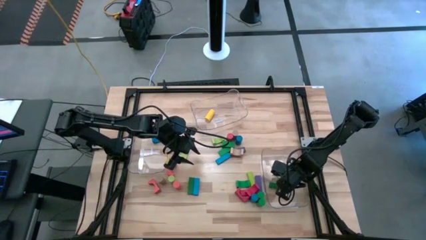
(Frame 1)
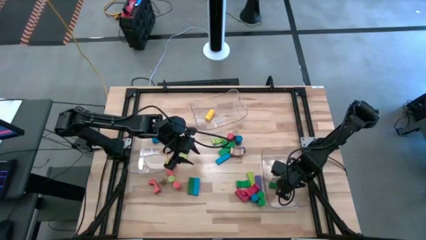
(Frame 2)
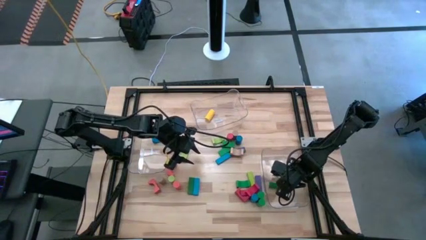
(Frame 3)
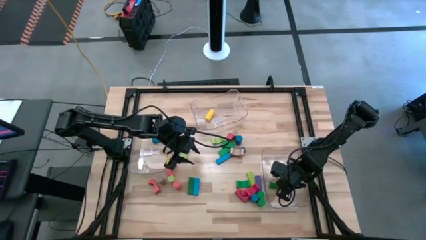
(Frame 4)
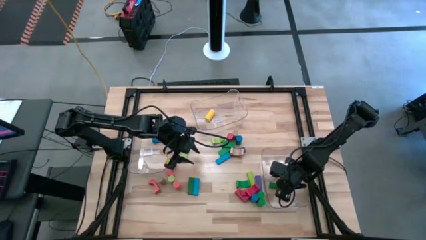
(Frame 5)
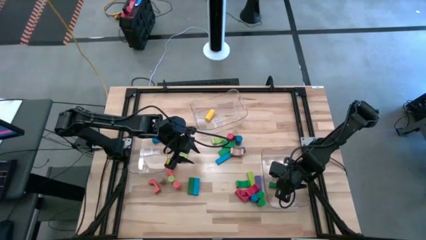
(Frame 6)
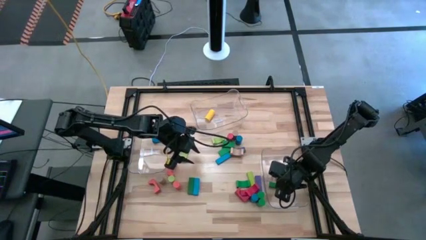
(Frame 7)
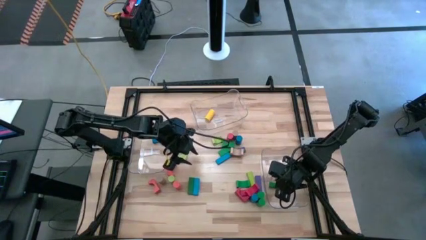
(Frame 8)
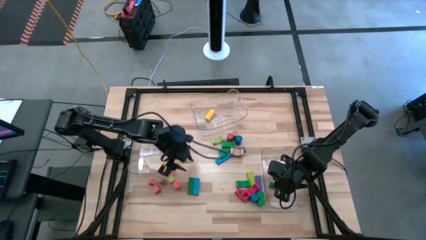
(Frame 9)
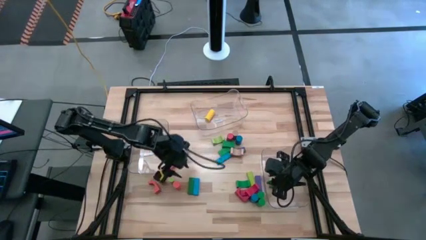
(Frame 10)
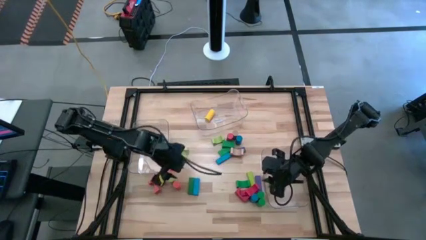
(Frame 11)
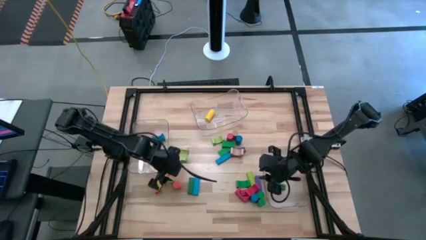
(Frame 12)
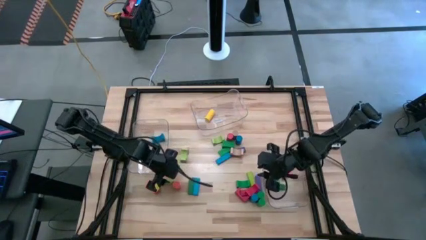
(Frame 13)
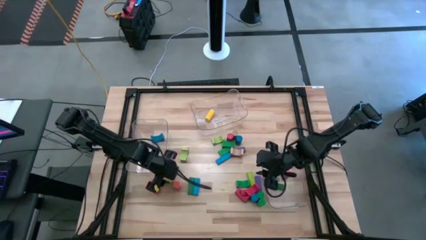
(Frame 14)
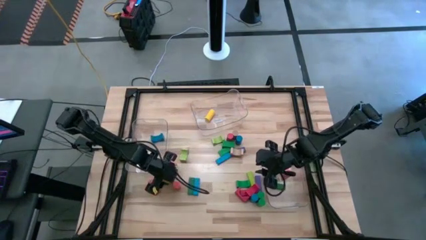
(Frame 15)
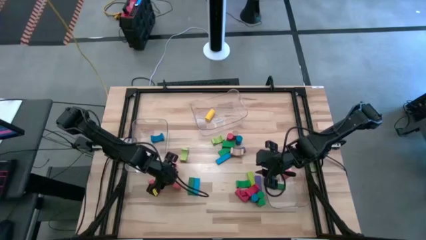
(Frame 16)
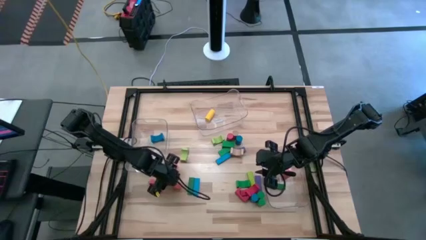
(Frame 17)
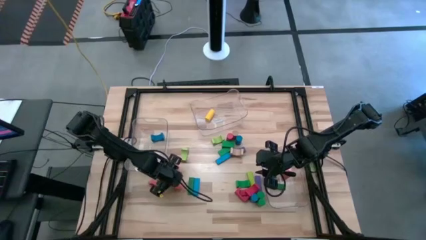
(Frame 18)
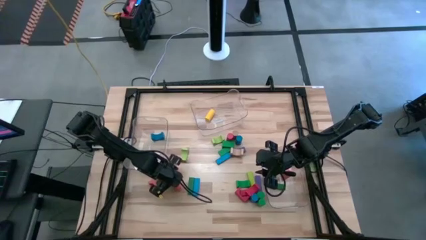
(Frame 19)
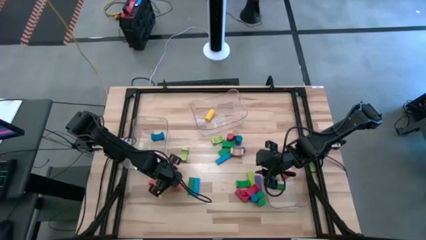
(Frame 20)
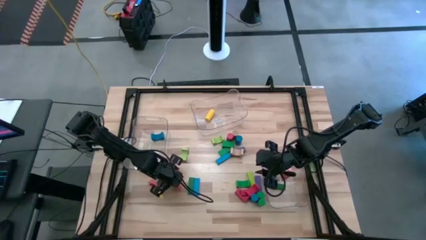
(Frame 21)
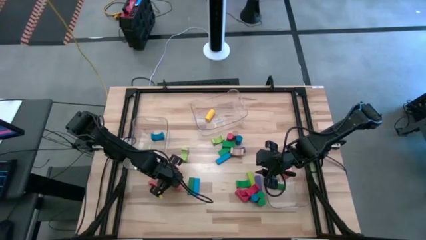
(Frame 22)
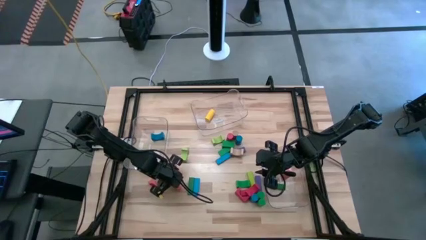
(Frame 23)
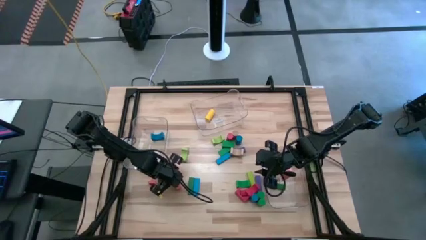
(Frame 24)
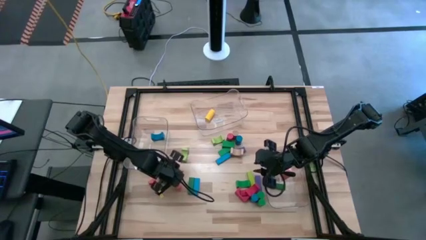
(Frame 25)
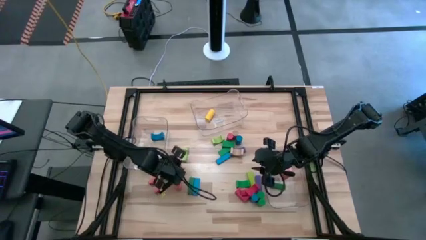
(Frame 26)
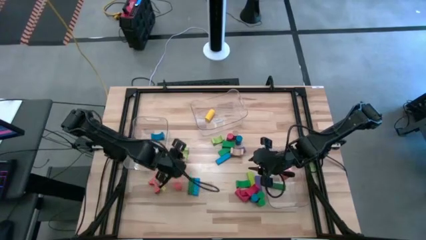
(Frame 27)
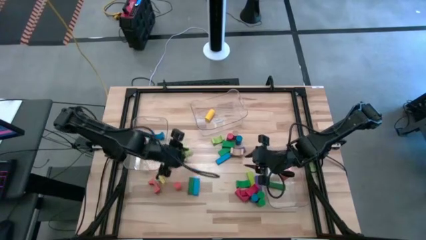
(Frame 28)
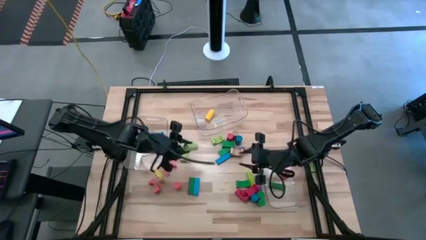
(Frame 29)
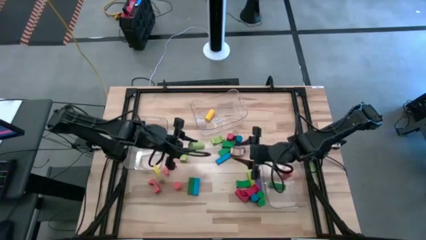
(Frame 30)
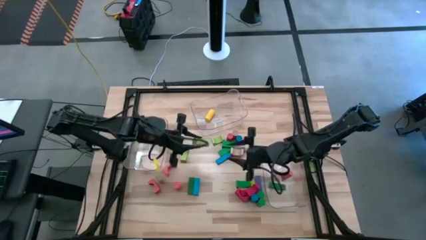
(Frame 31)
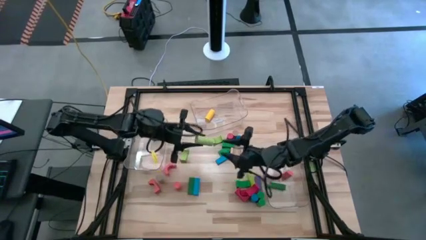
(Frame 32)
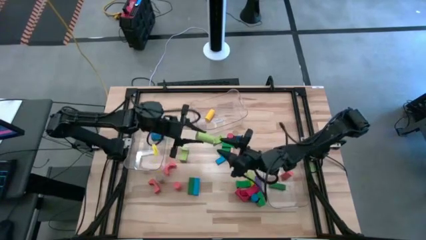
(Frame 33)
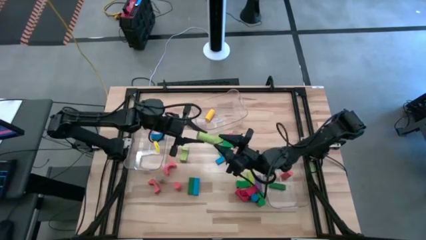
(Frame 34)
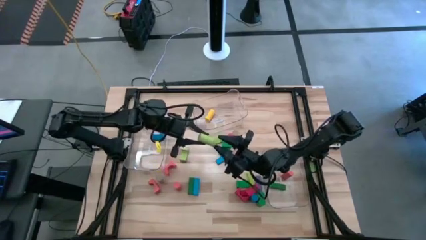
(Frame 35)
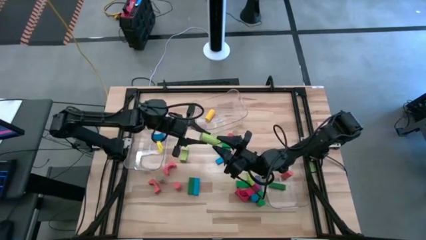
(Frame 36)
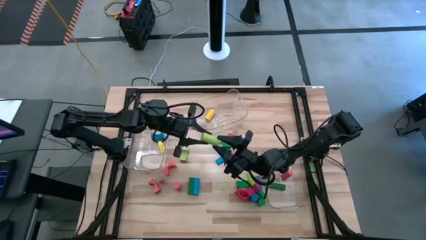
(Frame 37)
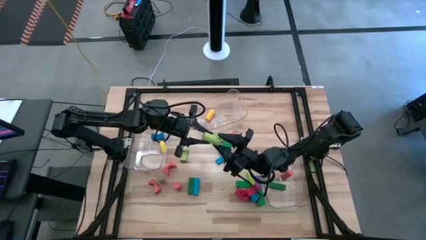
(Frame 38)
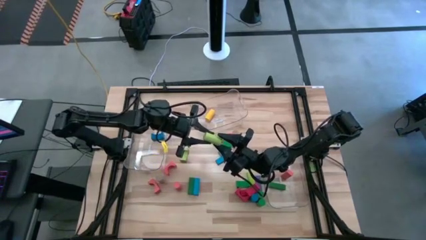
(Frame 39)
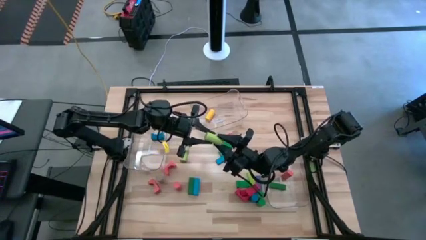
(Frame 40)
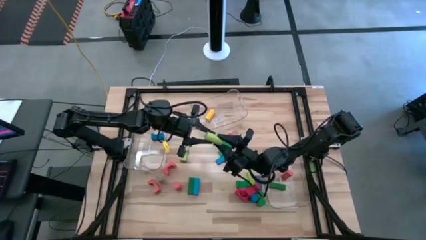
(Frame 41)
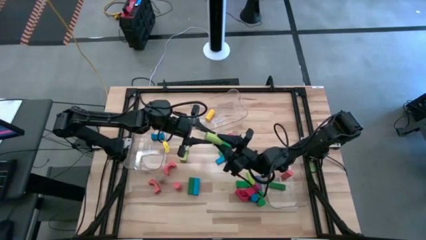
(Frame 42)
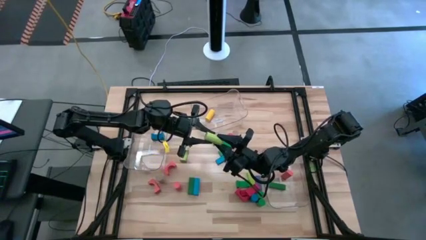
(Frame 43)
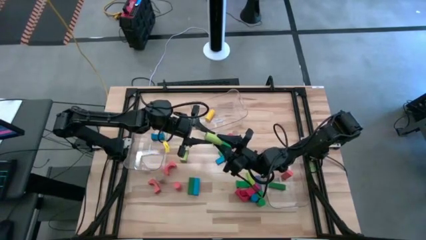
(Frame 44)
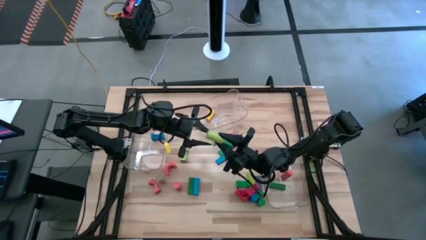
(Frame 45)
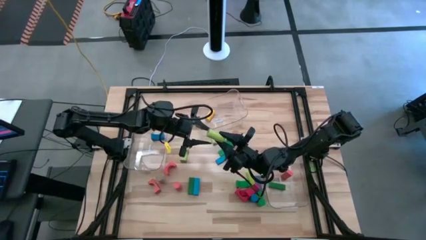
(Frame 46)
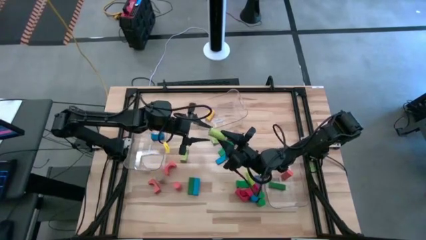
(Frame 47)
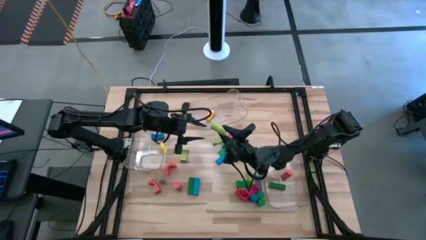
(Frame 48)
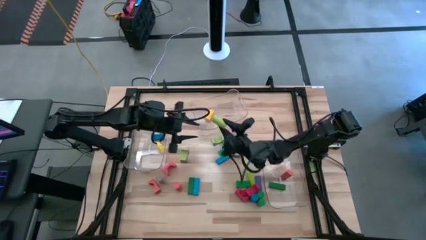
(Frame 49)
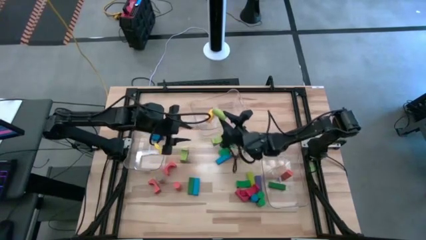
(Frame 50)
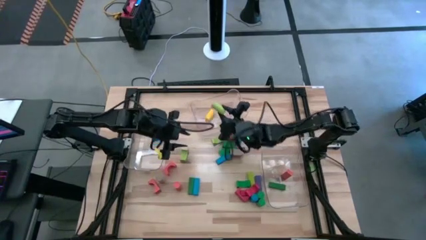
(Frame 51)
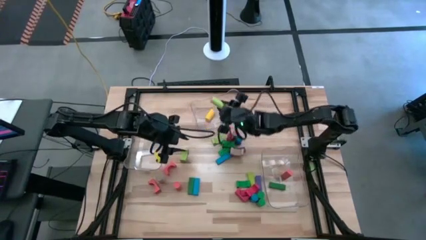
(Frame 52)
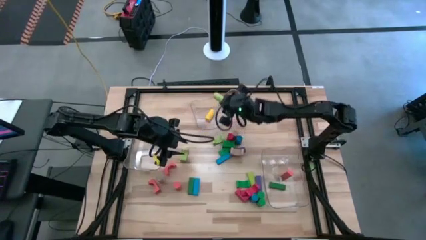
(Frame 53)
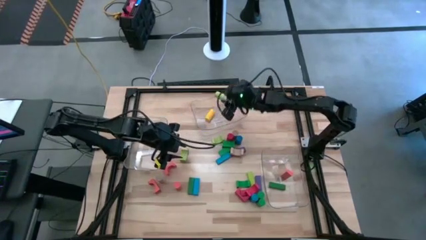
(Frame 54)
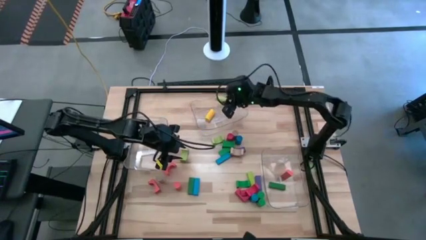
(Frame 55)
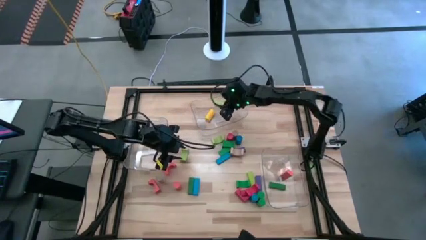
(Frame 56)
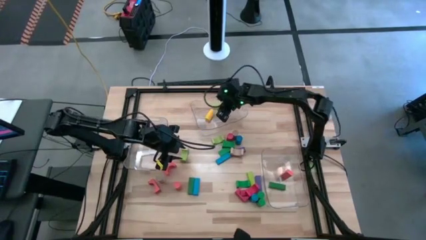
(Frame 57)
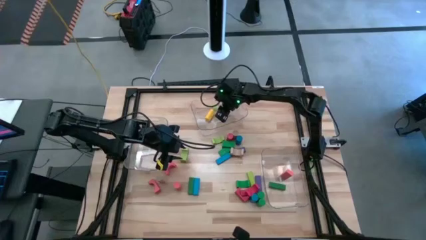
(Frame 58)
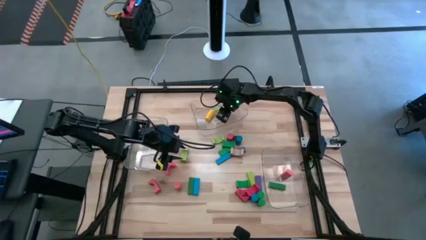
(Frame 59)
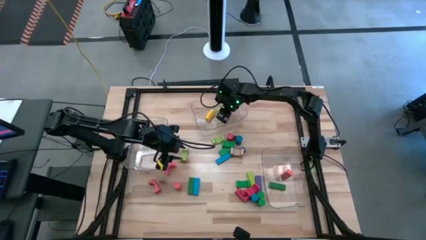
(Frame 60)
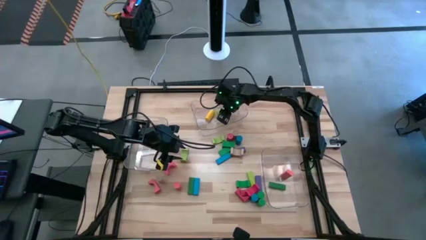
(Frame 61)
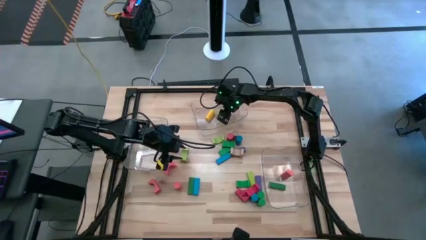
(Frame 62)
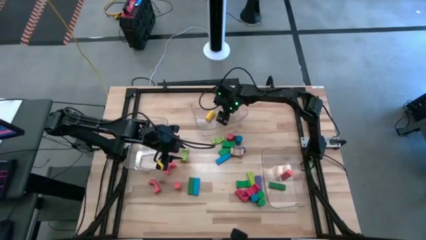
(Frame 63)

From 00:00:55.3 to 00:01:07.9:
Task: Sort blocks by size
Put the light green cylindrical block into the top transparent bin
